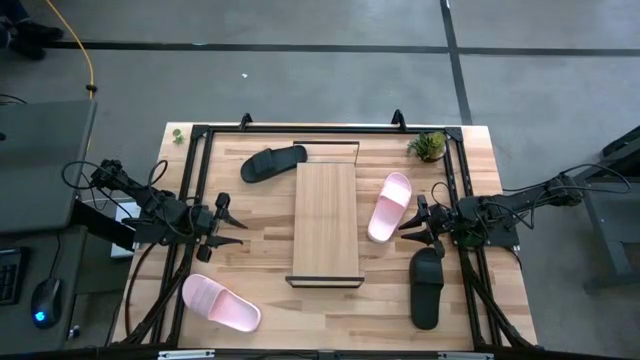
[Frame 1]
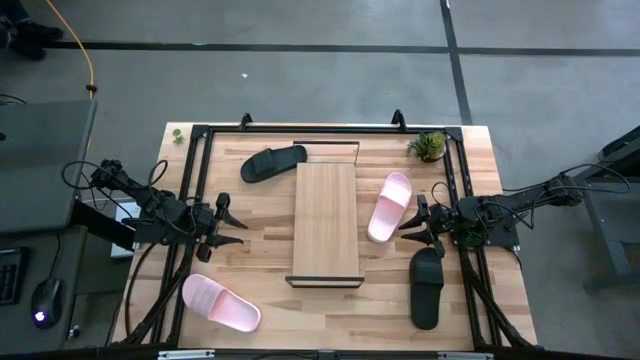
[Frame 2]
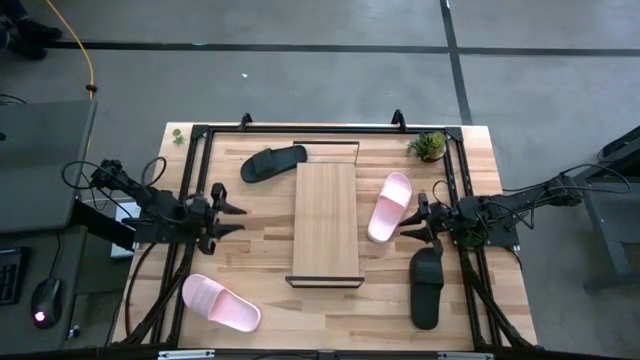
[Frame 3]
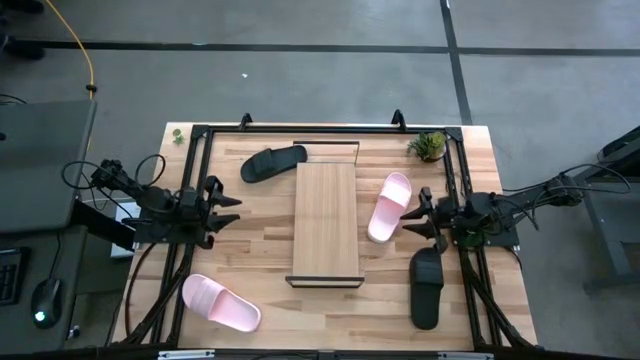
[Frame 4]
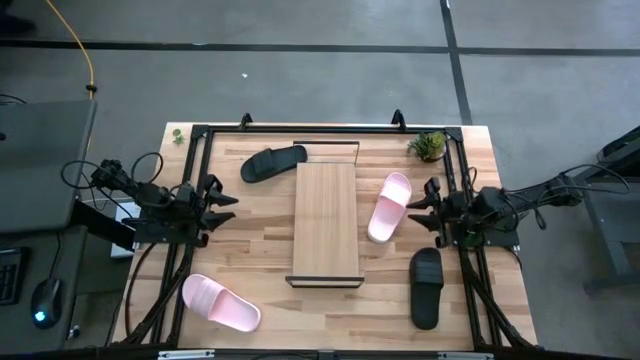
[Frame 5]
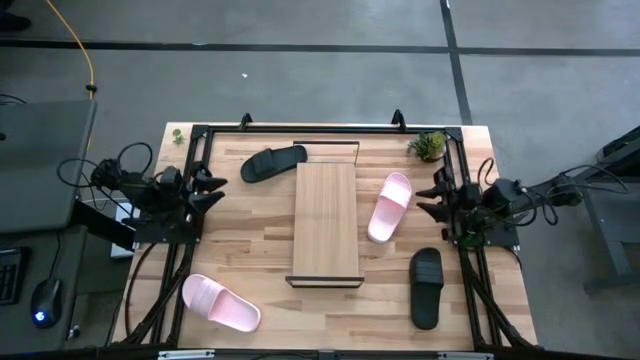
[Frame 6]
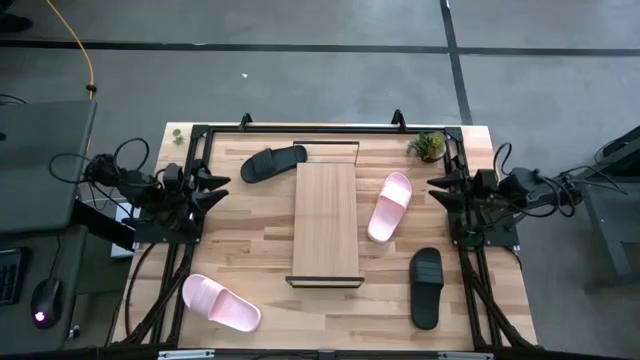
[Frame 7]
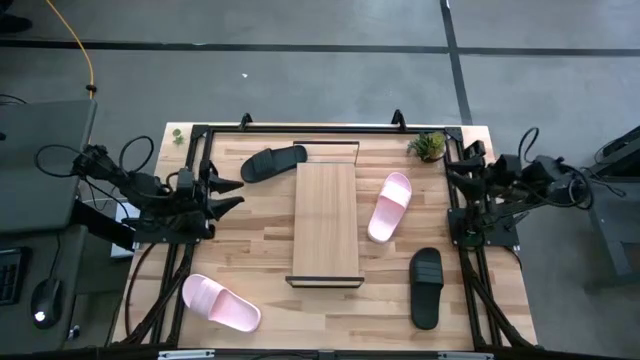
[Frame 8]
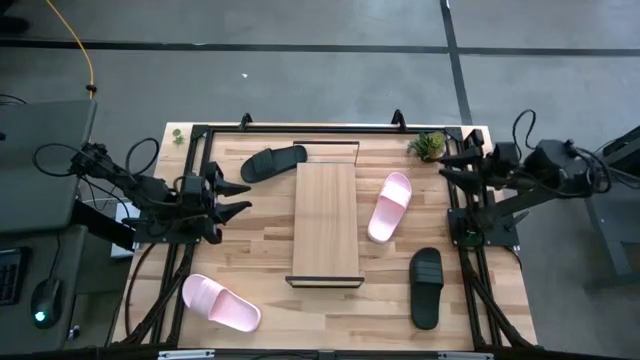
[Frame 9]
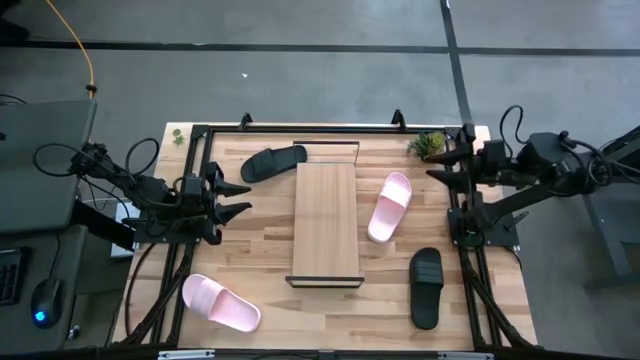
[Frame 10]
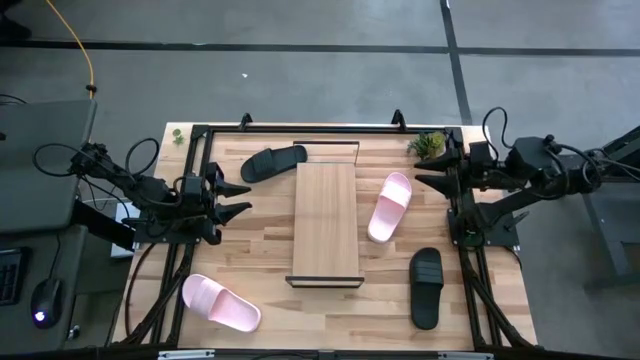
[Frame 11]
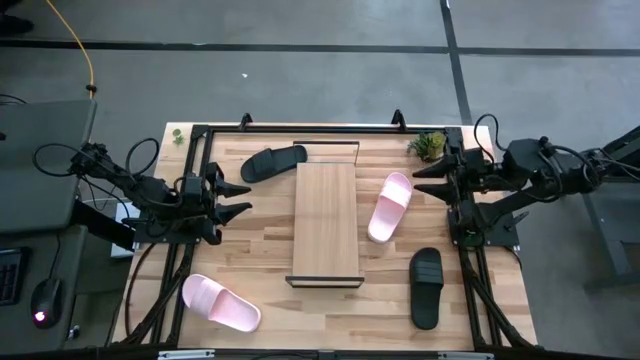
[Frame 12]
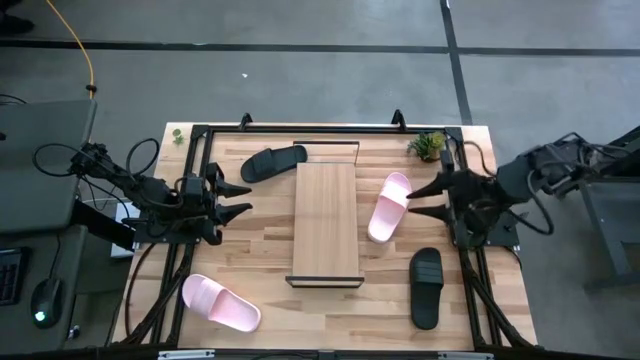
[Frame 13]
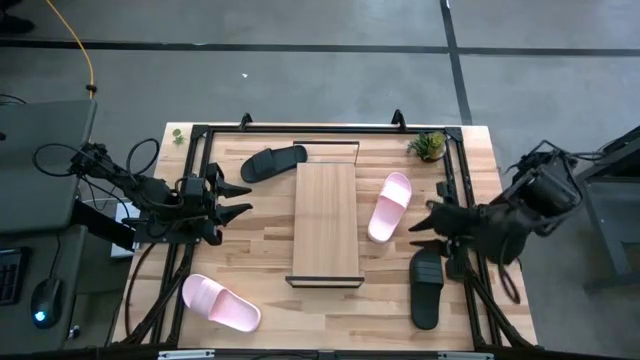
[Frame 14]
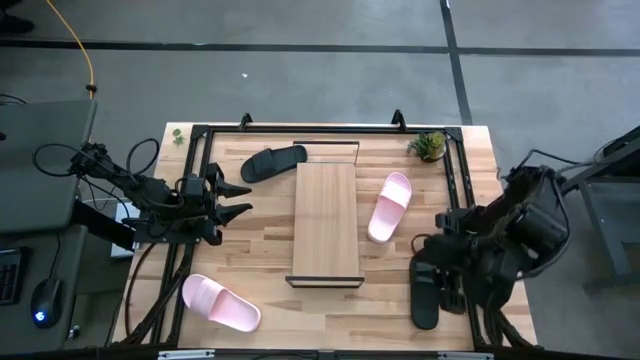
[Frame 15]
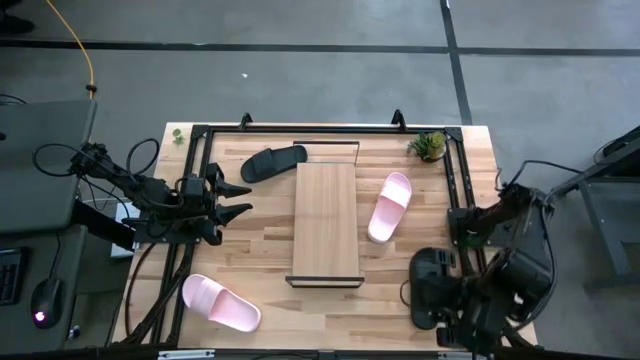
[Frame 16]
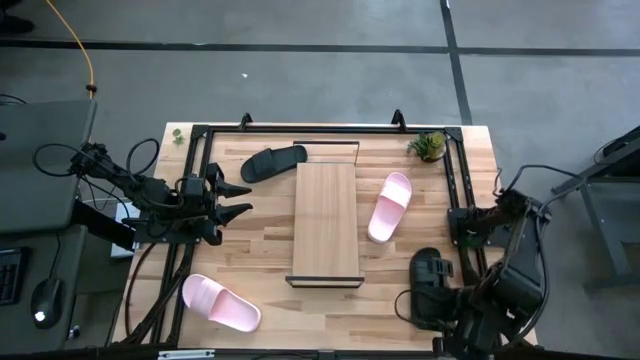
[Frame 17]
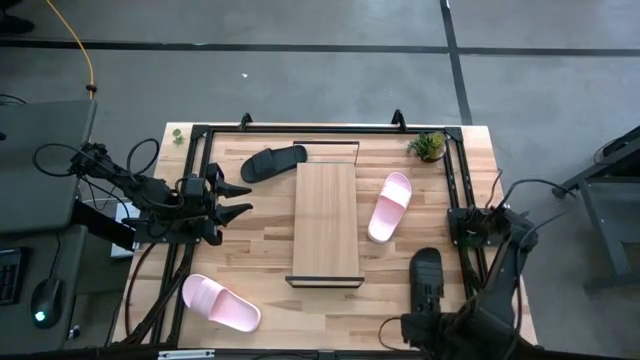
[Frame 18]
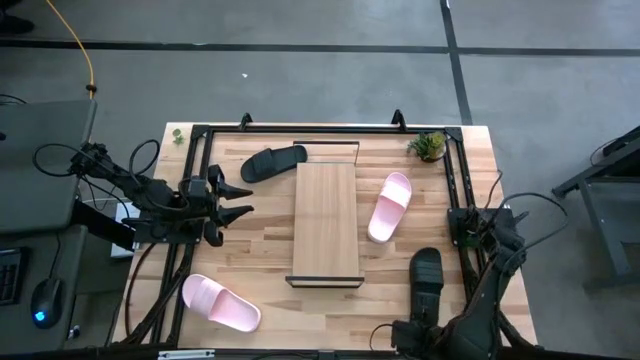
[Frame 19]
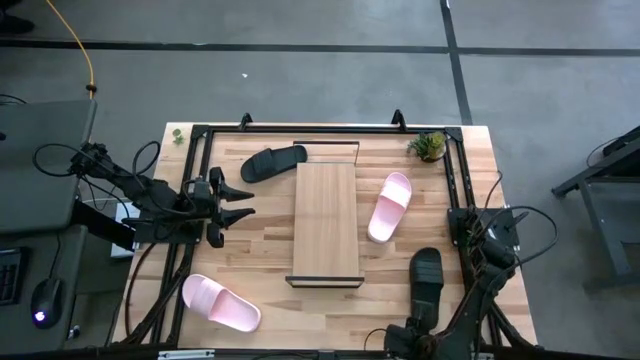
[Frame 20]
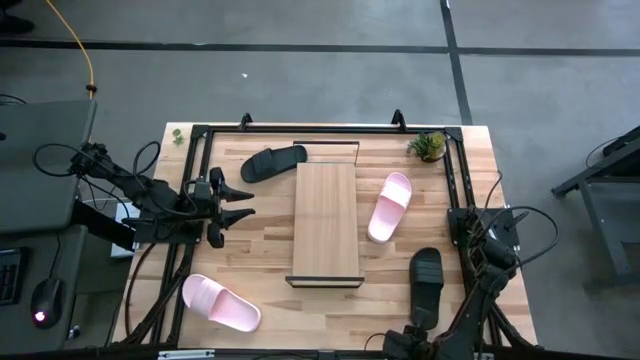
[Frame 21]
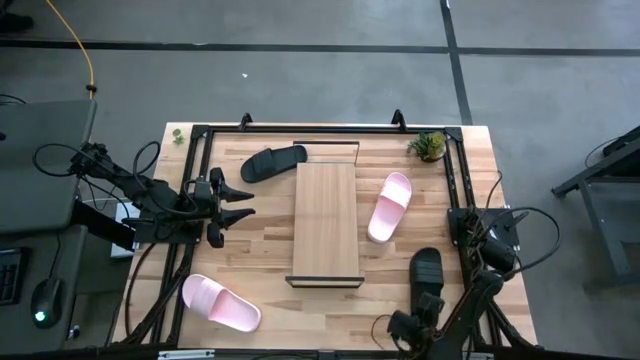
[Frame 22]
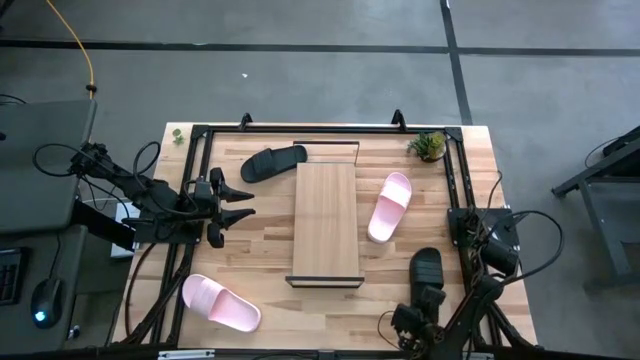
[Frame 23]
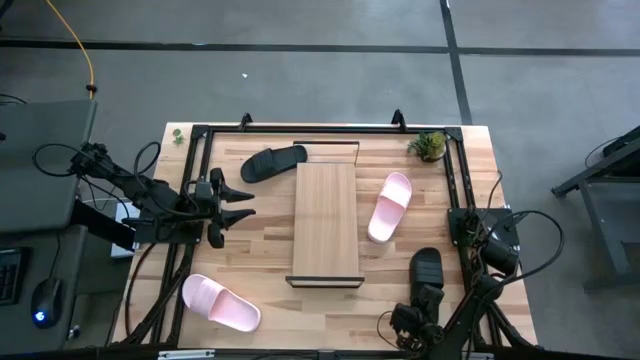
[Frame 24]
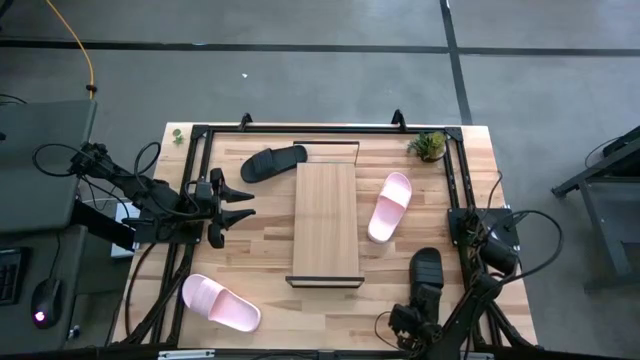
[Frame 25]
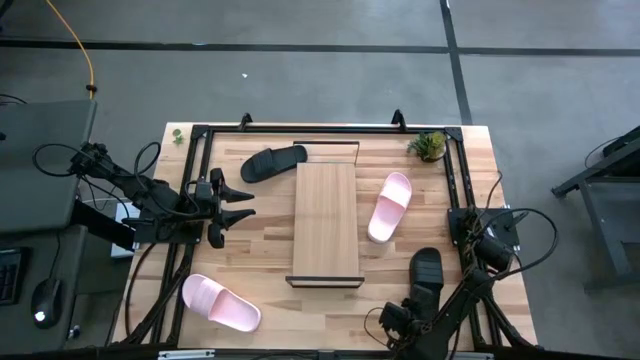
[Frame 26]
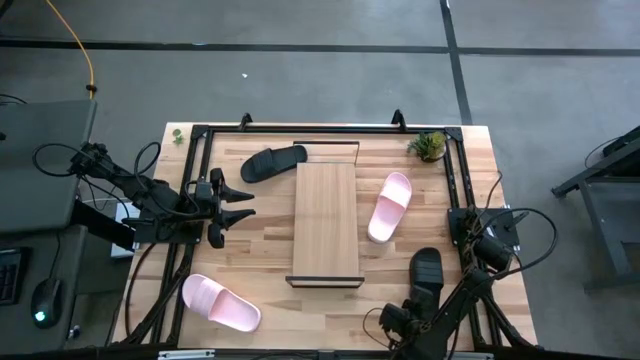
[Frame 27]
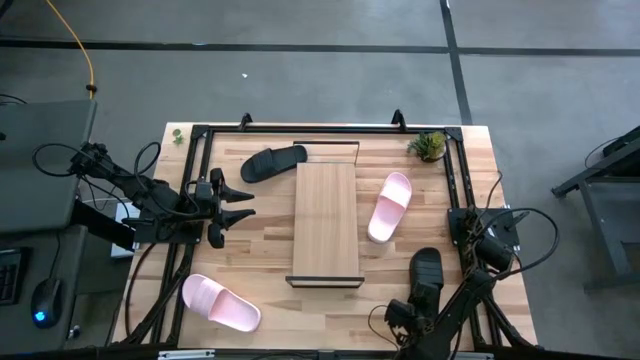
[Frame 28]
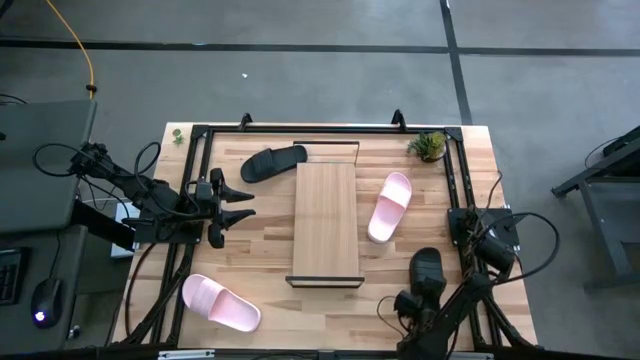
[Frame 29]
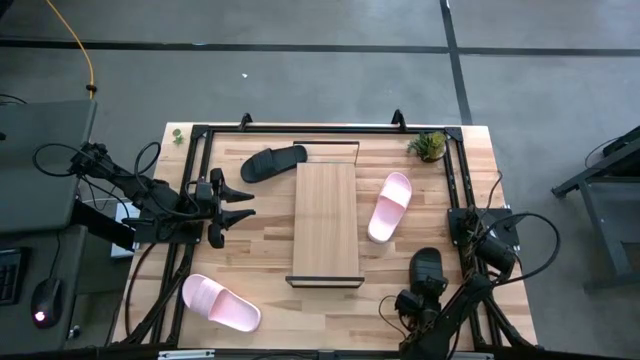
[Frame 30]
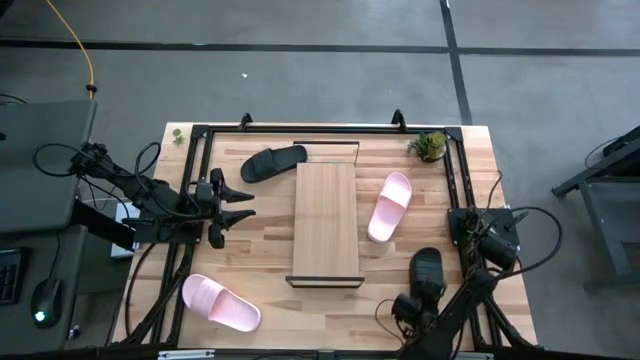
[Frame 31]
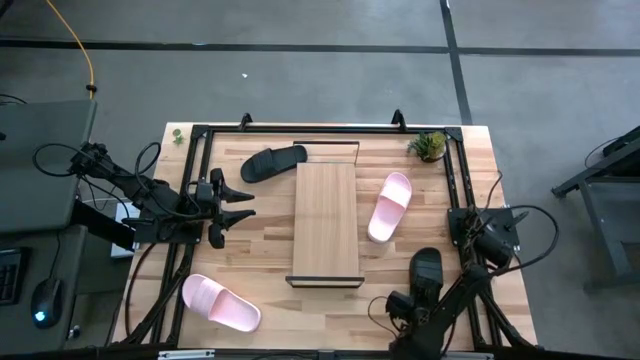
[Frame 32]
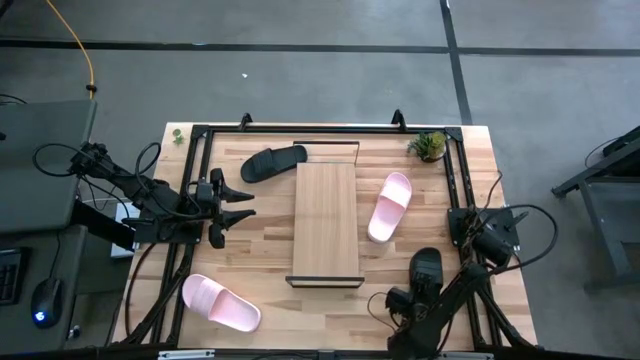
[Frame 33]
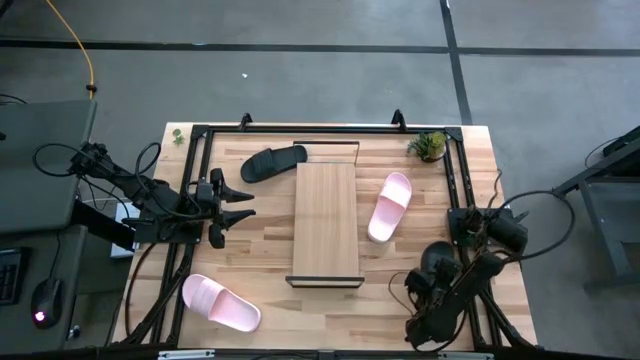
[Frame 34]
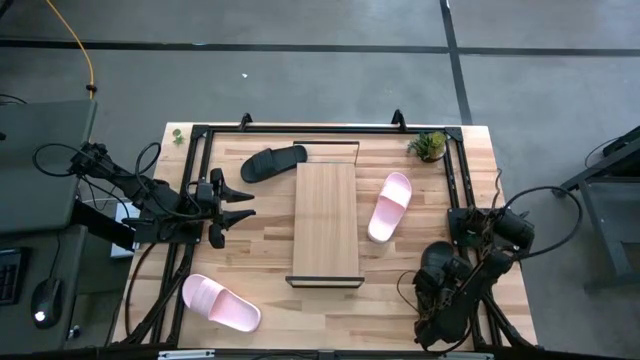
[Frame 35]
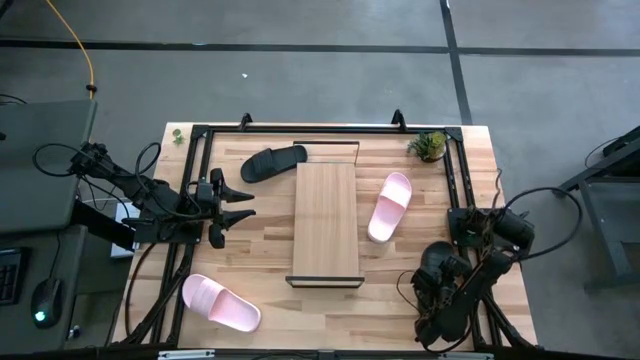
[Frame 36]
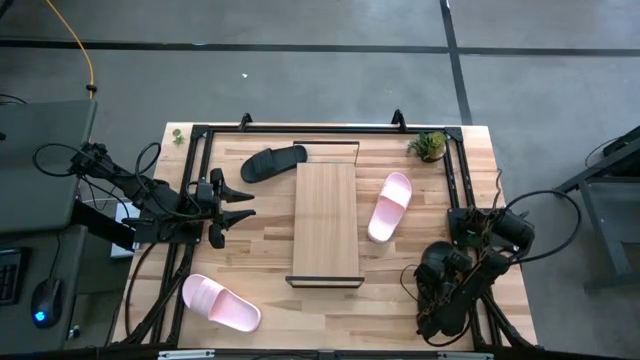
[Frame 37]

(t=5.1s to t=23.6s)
Task: Pick and place slides into the shelf
Put the bottom black slipper on the shelf

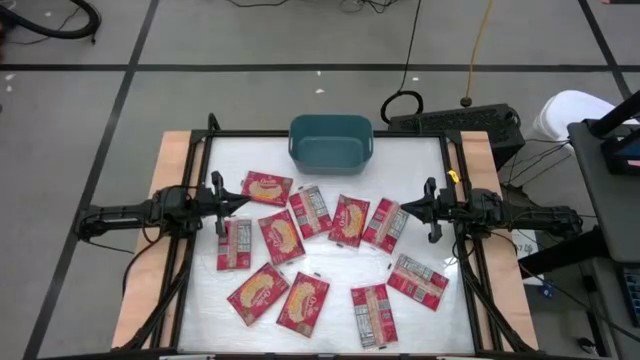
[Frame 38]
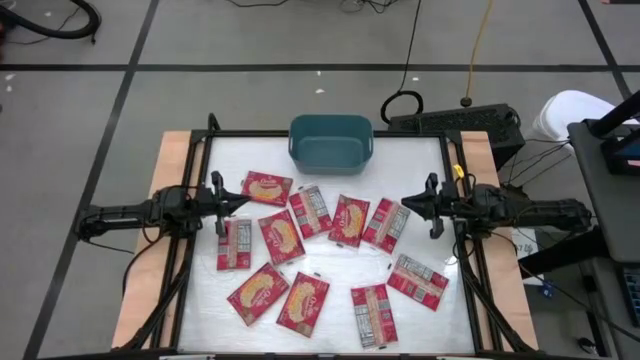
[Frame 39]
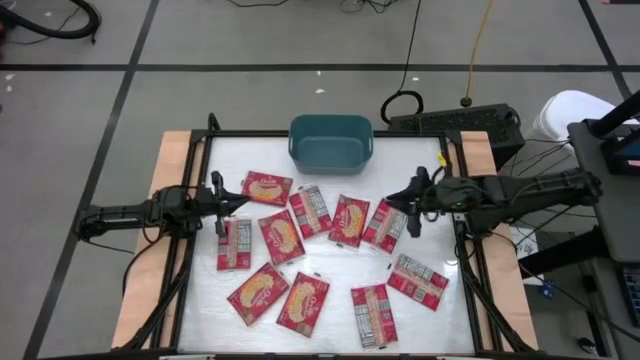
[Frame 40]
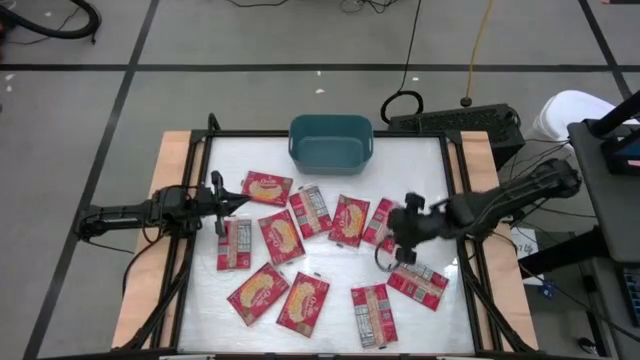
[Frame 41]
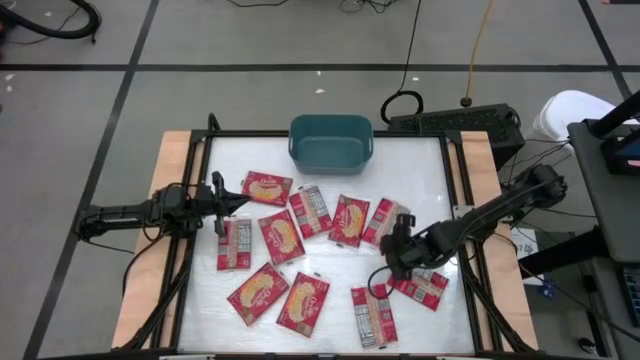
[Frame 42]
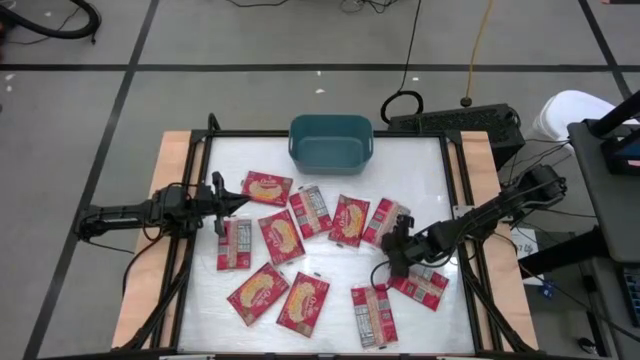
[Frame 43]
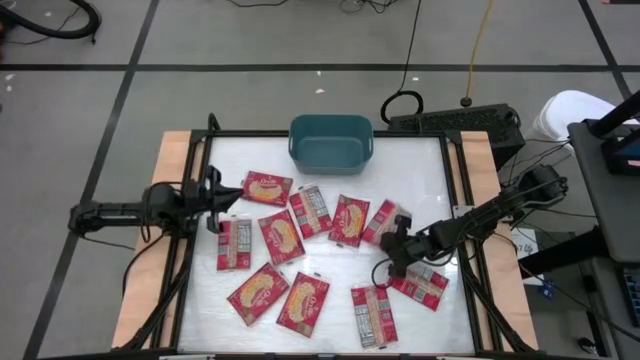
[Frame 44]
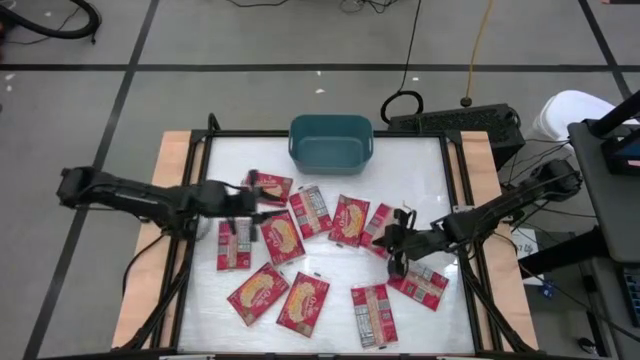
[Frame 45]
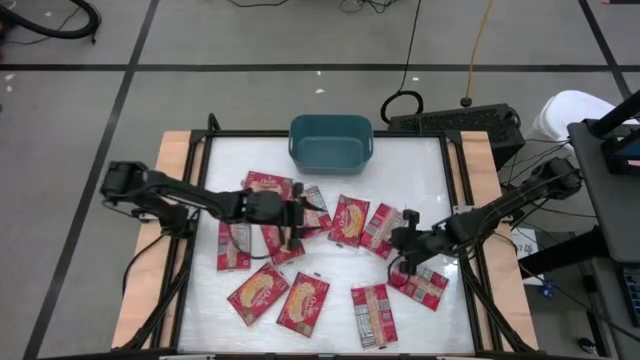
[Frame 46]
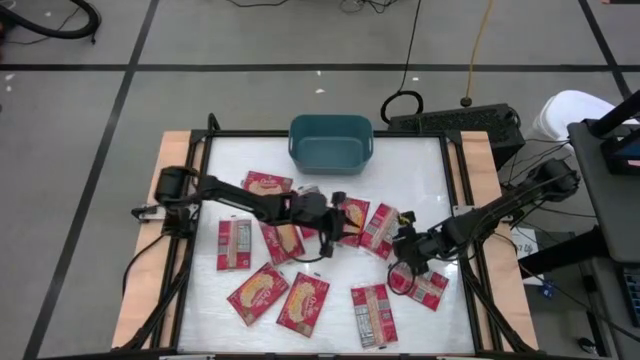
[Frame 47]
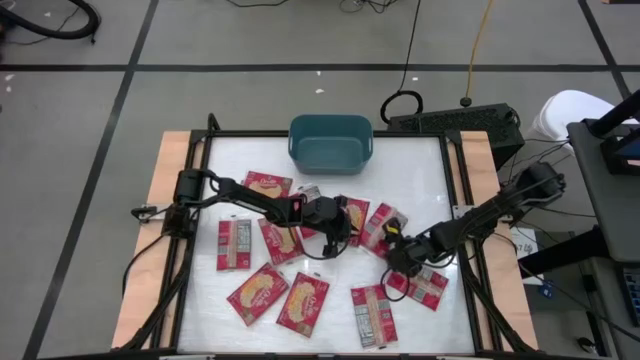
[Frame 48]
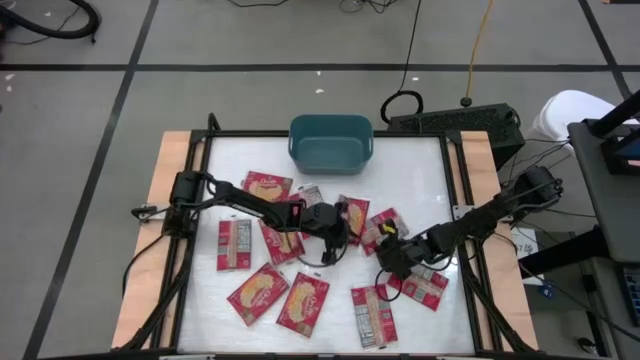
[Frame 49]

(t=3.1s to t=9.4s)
Task: Sort popcorn bags into baskets
Put the red popcorn bag into the green bin
